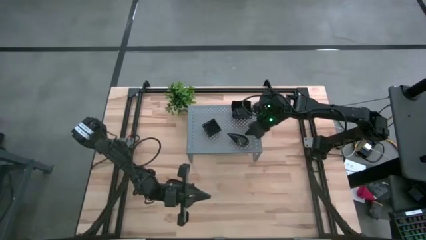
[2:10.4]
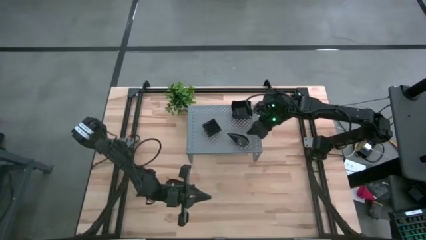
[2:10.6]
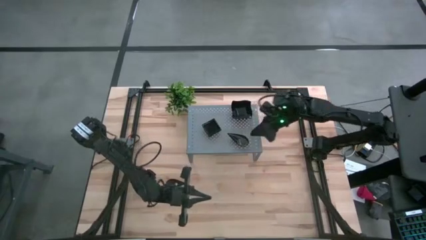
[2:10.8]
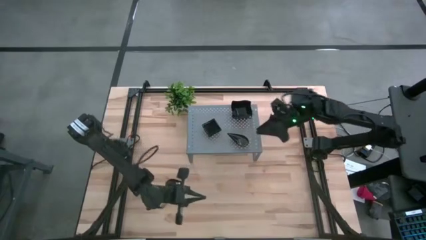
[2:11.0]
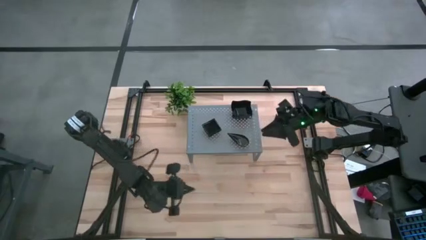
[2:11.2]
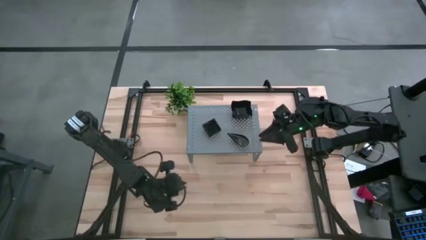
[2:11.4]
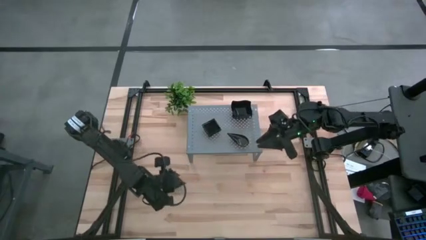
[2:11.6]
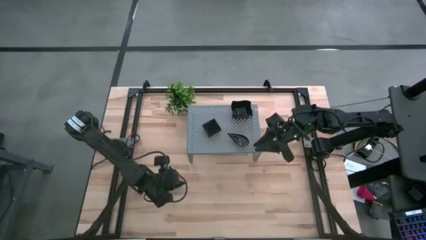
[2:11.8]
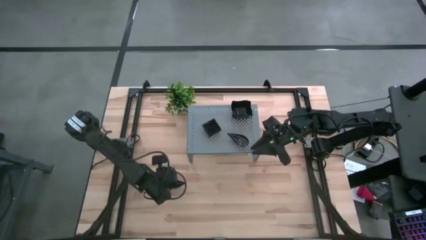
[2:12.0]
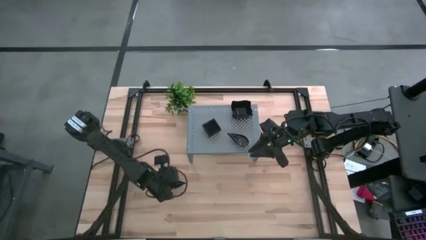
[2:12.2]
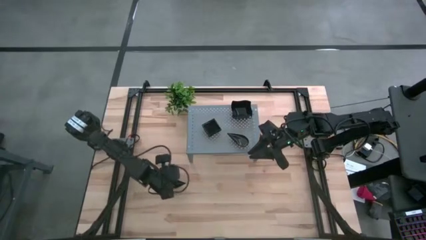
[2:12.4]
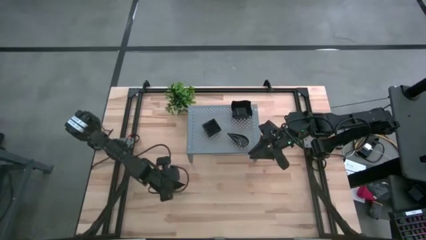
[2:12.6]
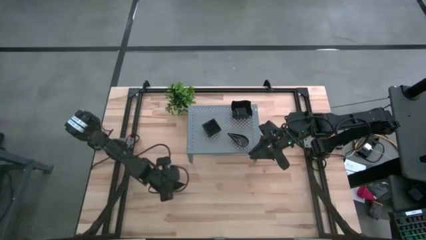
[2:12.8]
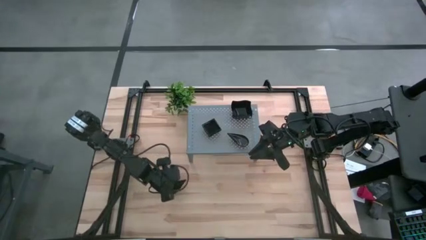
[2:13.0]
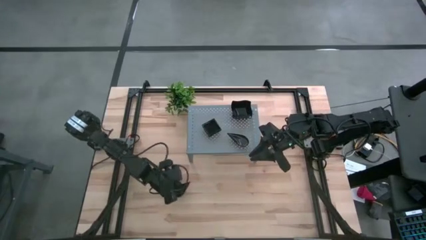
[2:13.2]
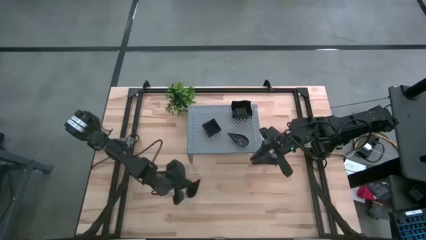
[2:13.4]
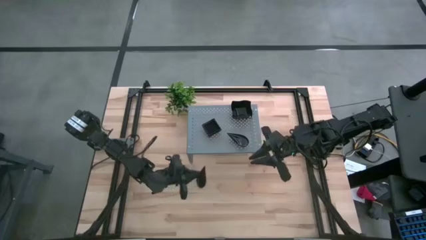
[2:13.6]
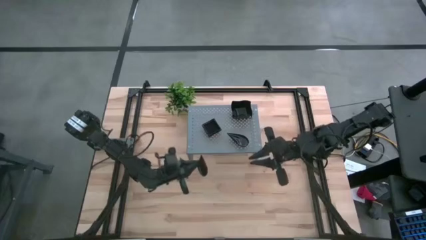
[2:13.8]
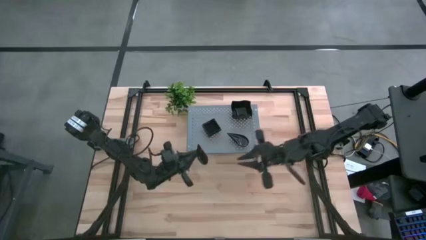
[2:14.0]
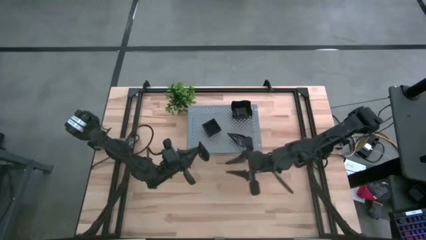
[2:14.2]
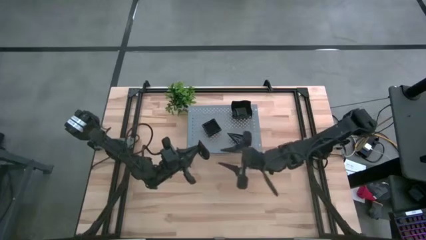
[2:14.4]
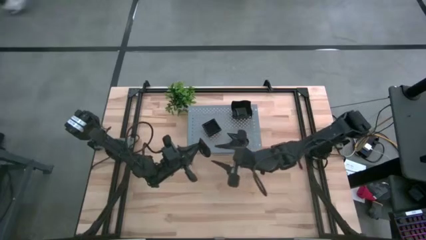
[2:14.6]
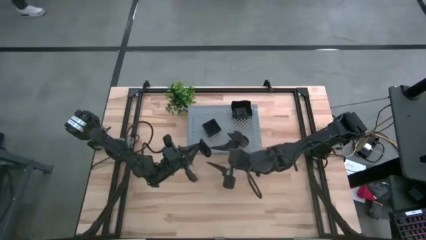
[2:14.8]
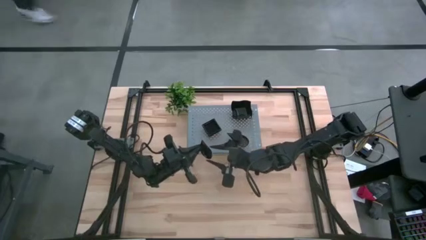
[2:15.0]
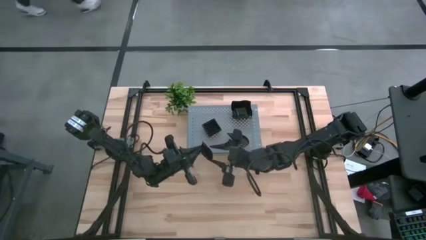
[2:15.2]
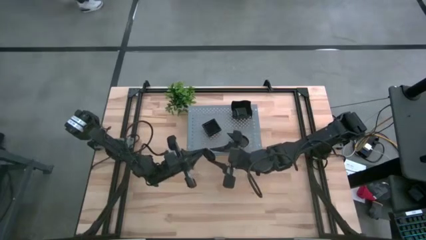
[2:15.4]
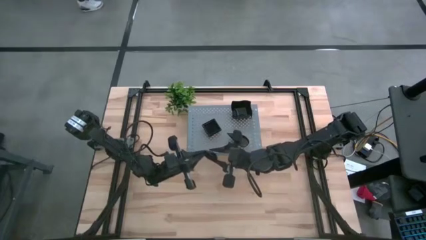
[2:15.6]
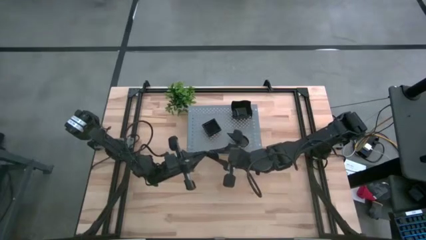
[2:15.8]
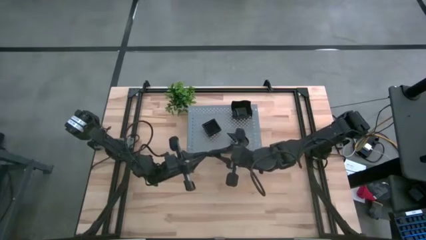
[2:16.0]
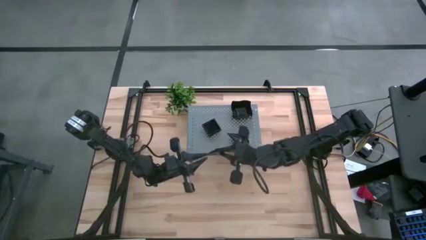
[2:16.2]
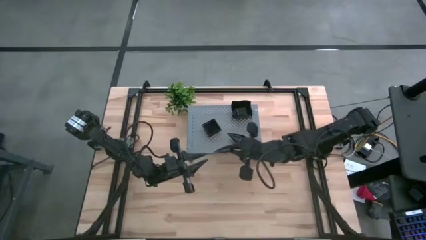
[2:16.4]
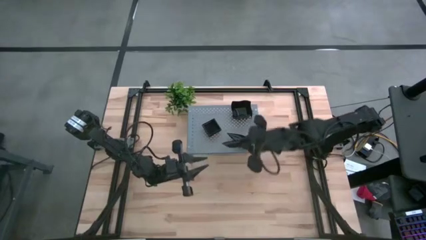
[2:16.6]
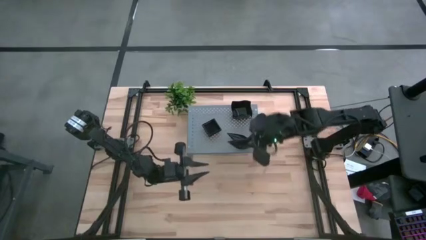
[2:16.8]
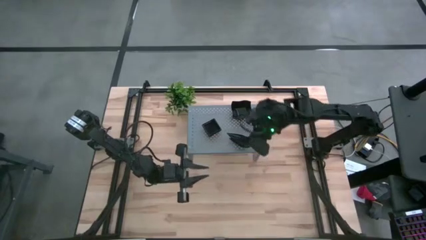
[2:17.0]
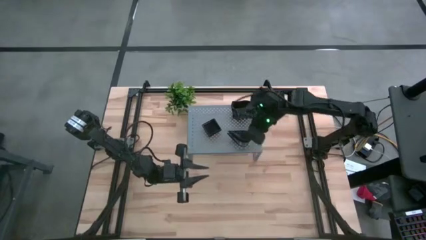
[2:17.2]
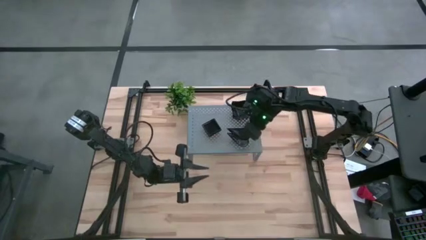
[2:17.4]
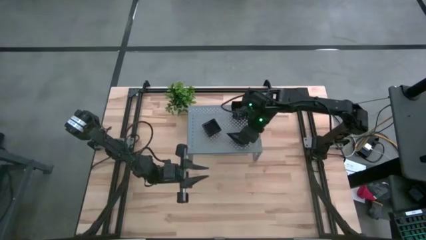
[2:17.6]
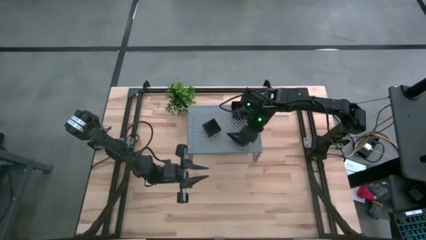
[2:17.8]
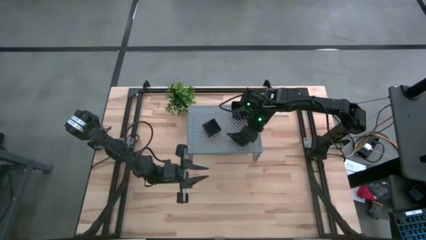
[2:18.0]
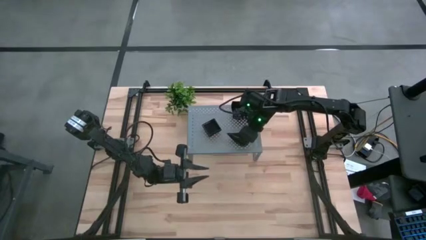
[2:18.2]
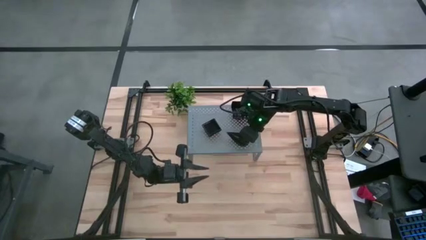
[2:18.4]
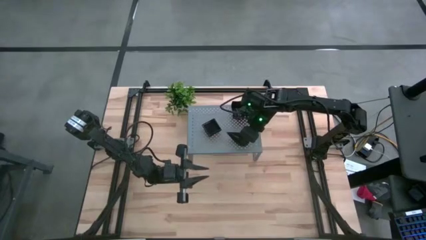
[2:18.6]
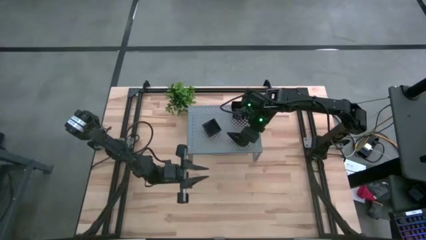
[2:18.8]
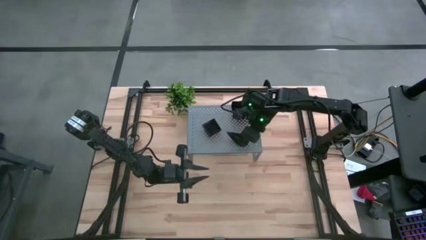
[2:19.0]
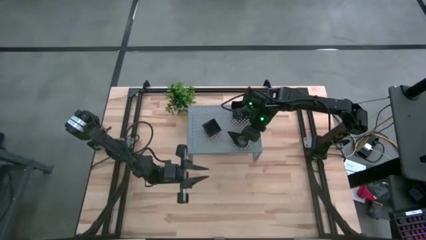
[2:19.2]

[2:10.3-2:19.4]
Task: Pick & Place Mini shaped plates
Stack the black drop-shaped plate on top of the black drop-shaped plate on the shelf

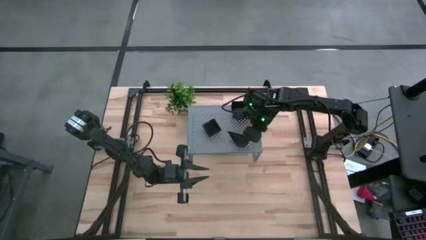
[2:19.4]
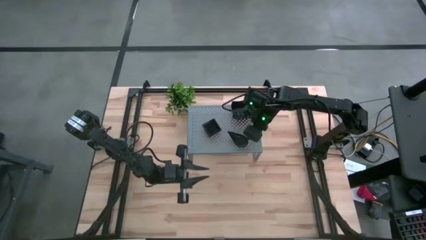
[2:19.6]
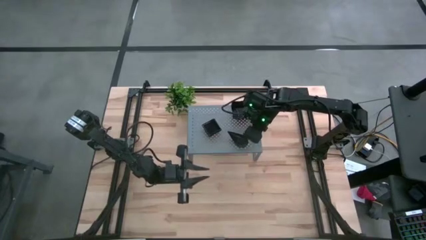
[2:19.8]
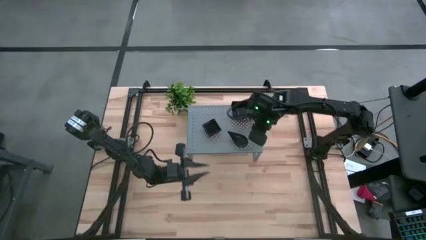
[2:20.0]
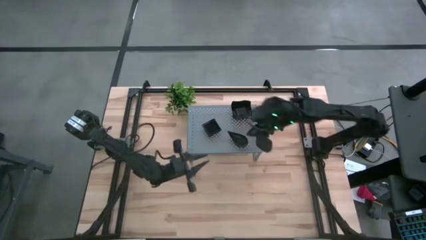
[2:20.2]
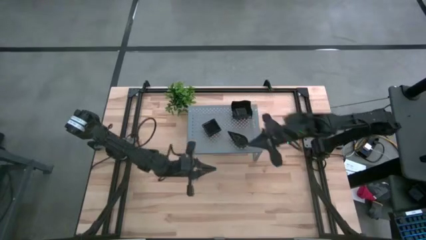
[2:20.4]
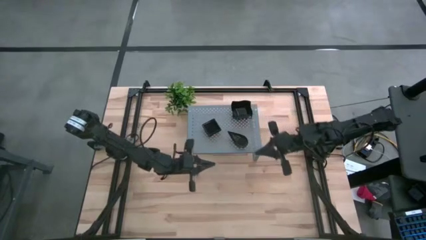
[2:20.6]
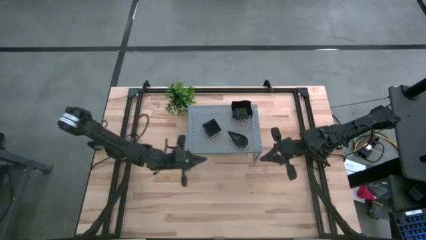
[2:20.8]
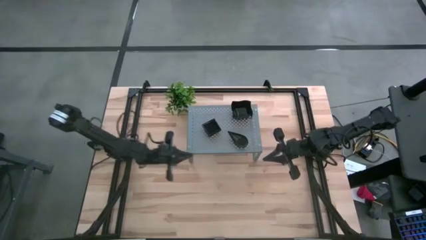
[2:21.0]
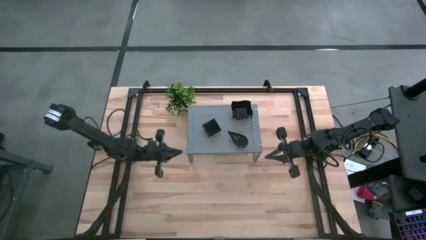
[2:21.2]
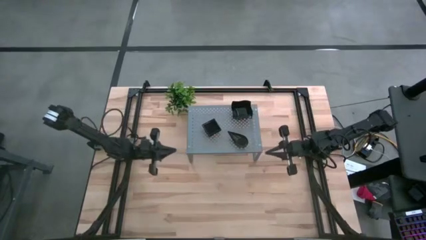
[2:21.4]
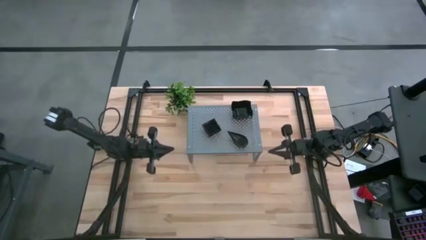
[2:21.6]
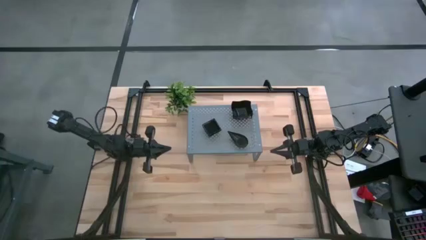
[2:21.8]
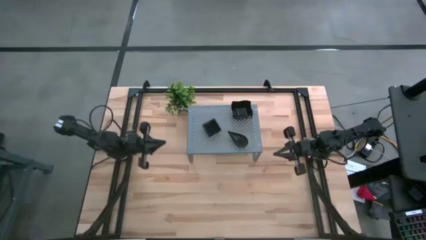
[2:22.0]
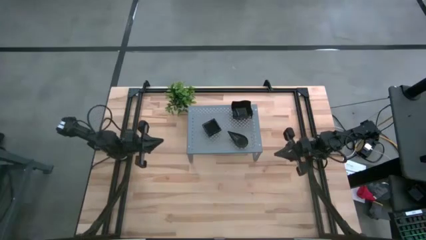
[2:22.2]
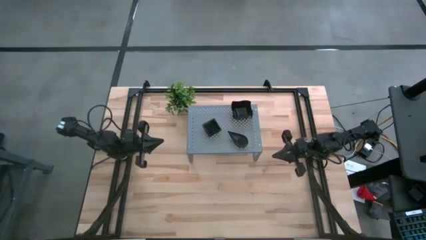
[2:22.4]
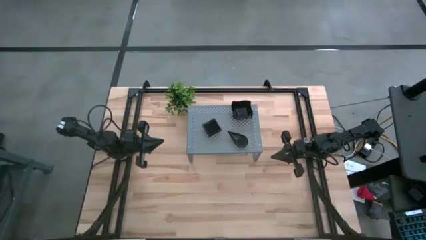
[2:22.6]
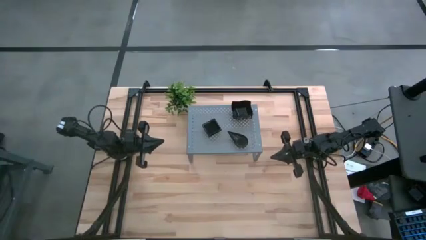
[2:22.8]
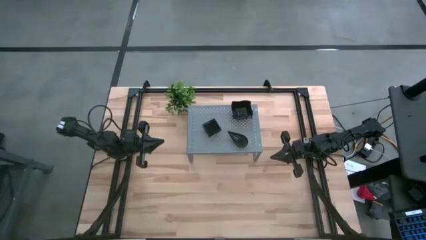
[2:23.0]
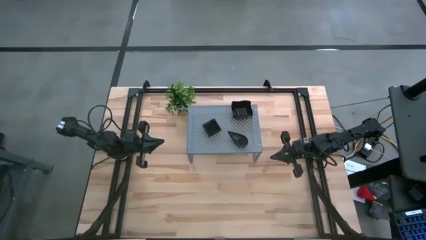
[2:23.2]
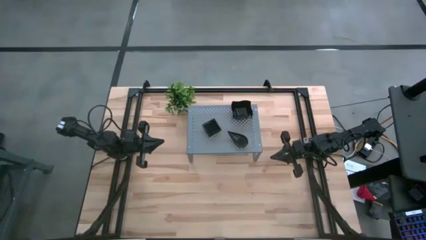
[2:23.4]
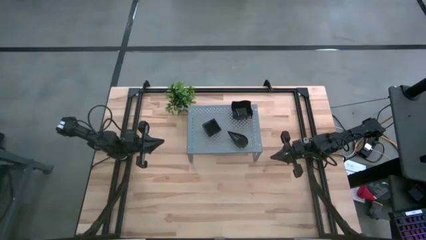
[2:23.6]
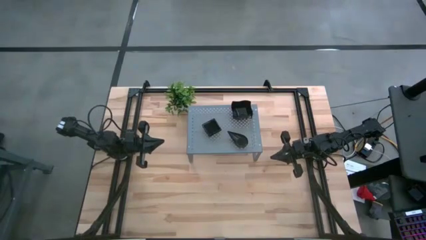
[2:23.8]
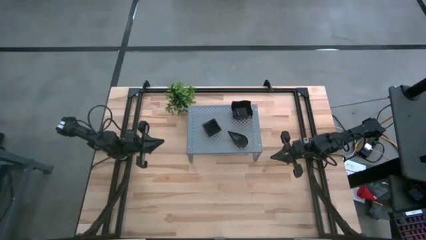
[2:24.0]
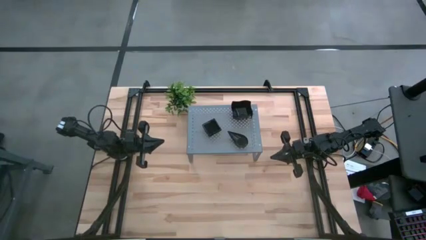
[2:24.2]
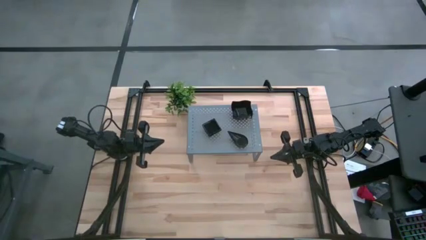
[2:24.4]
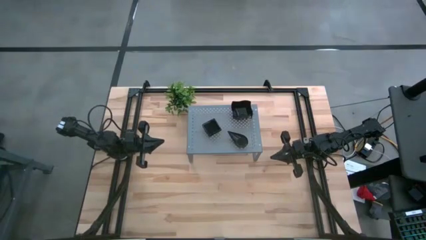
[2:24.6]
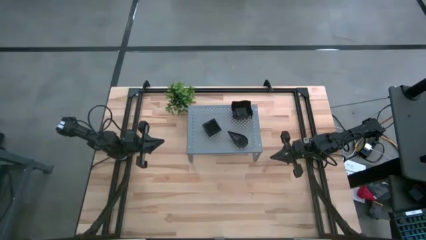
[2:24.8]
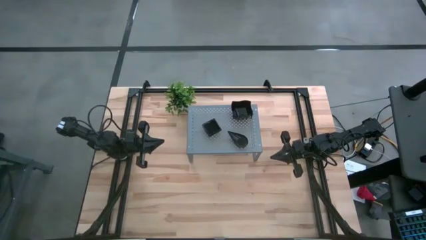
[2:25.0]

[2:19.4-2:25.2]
Return to Home Position

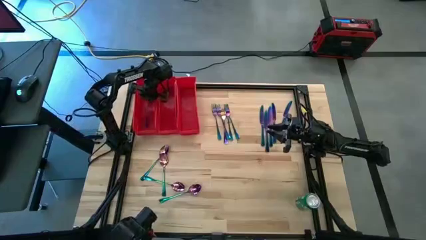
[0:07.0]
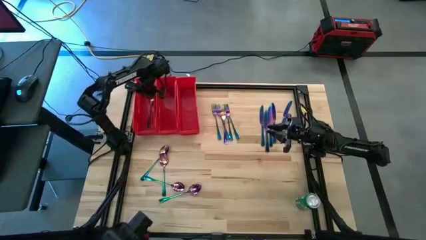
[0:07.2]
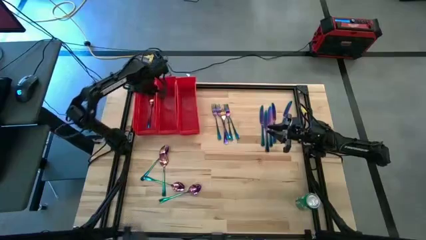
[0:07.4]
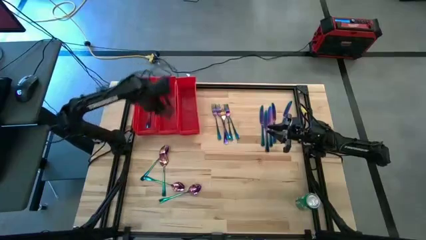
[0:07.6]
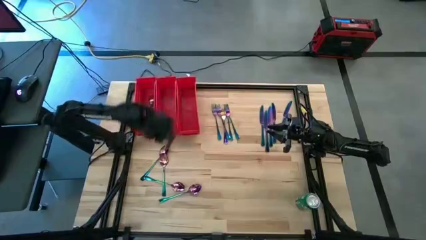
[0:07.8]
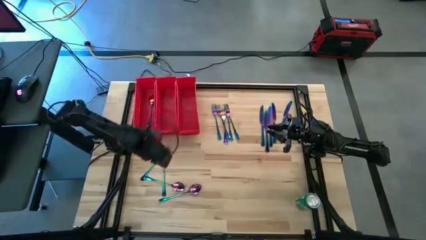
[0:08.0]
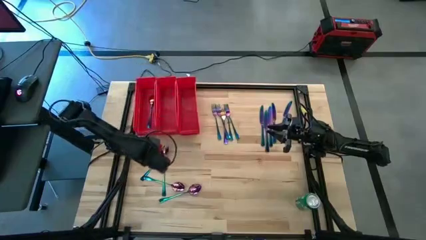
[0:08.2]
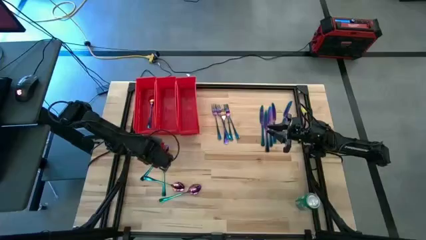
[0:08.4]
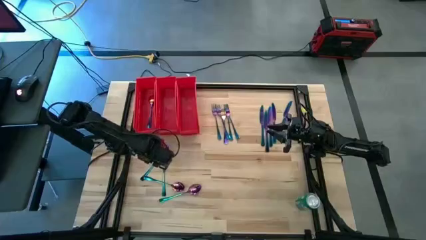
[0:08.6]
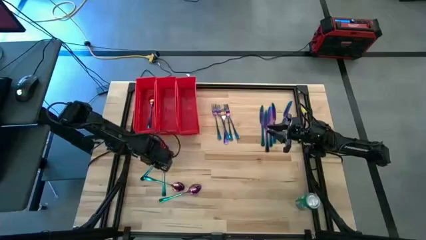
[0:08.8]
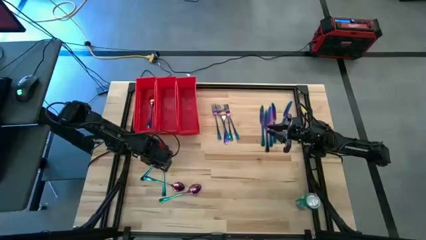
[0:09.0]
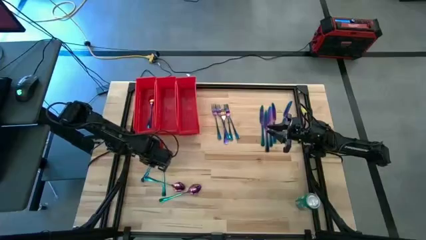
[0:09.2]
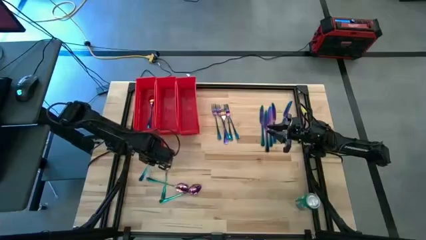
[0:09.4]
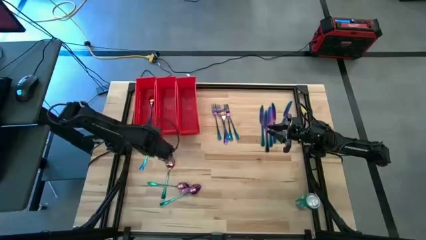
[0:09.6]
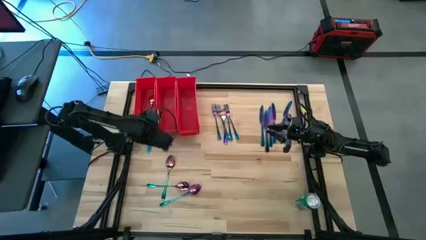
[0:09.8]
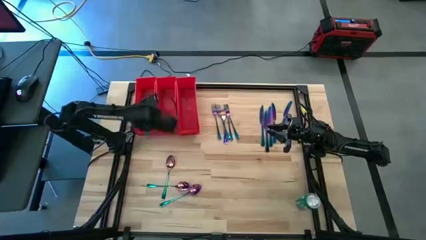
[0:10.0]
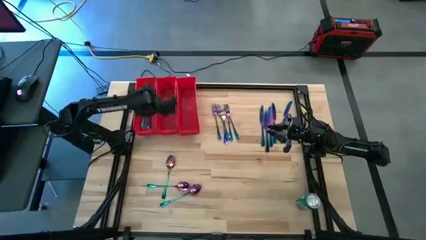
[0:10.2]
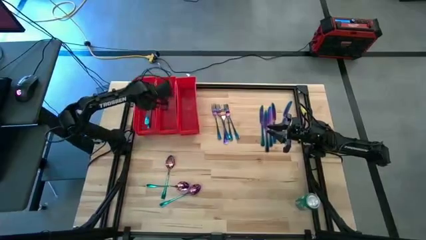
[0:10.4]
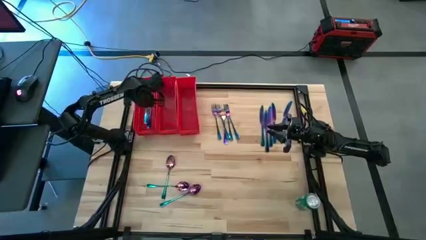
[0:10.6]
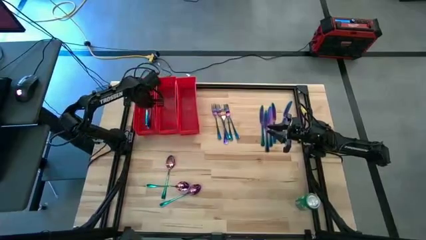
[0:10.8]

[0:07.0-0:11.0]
Task: Sort silverware
Put the blue spoon into the left red bin
